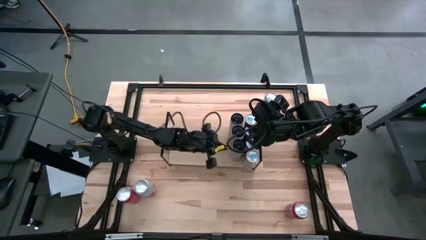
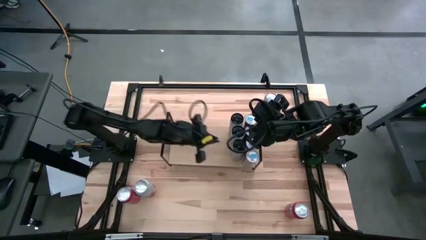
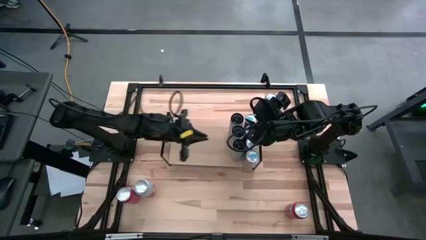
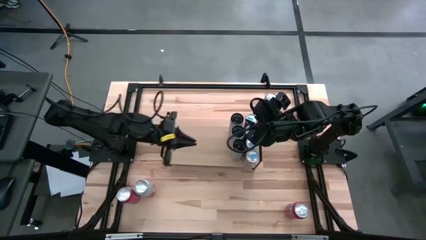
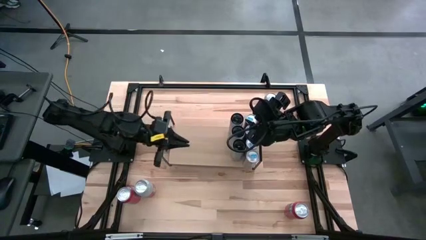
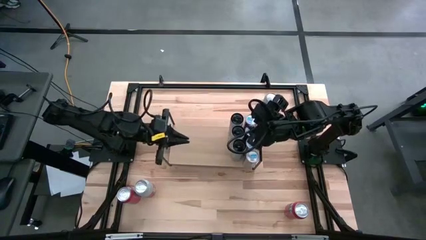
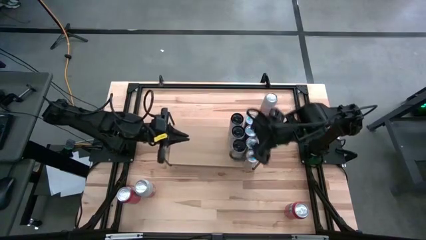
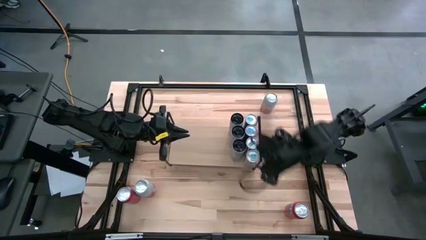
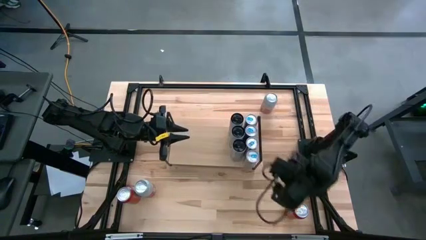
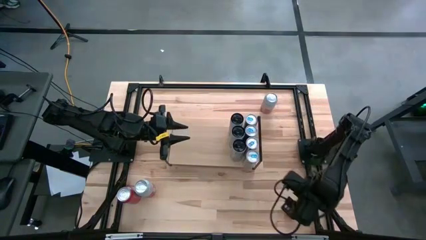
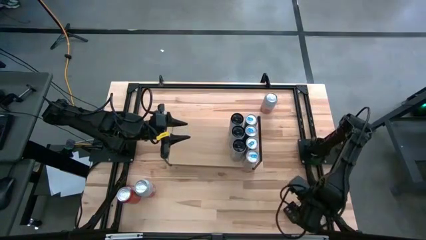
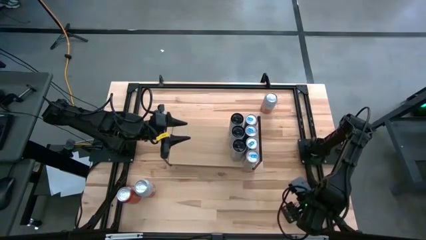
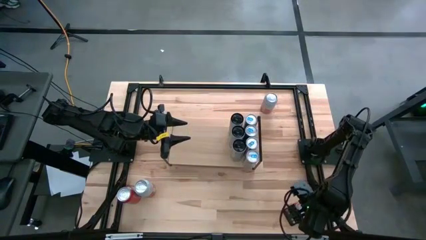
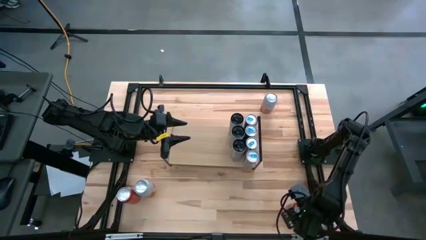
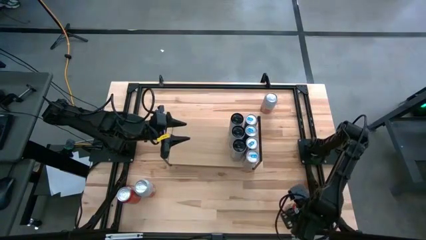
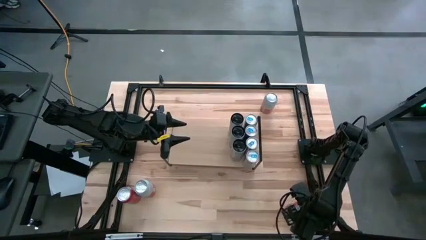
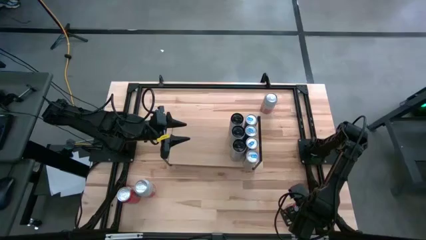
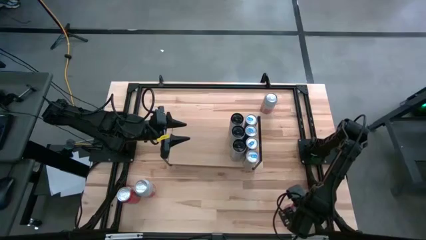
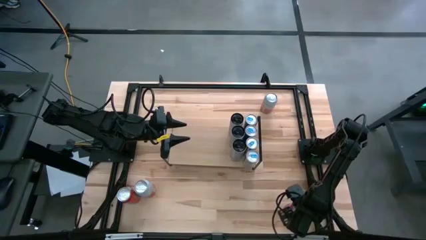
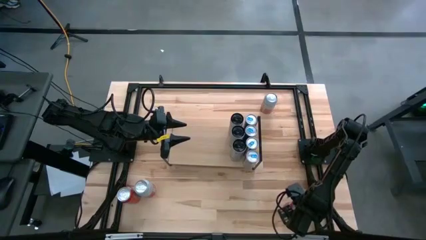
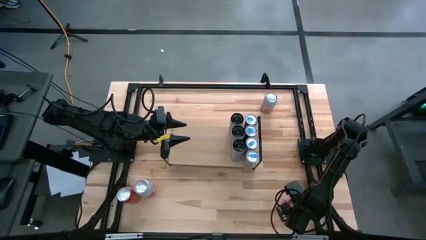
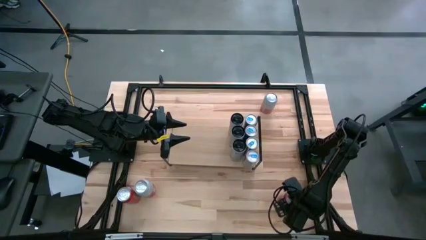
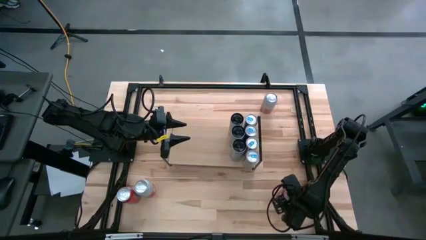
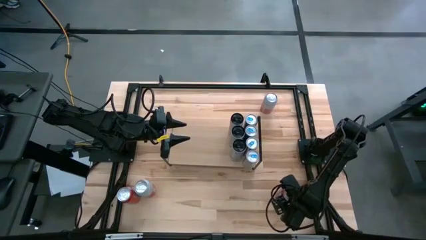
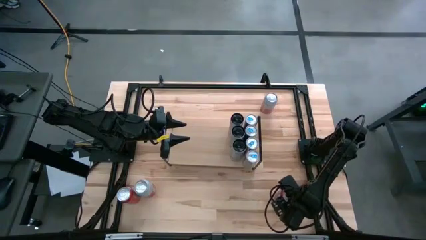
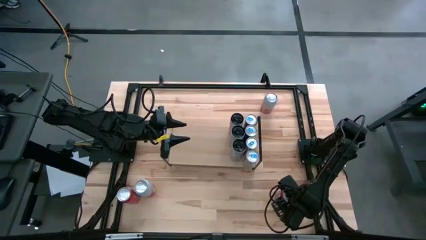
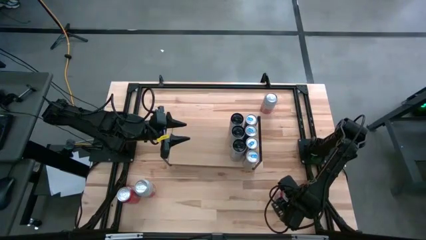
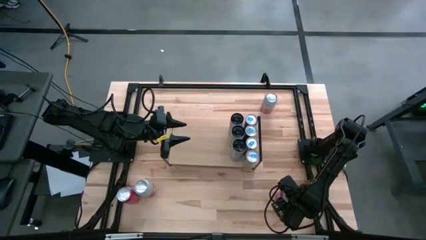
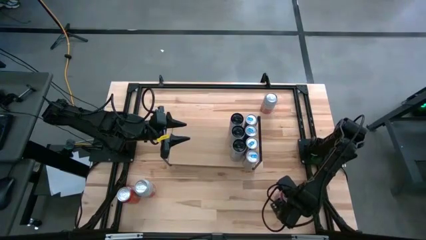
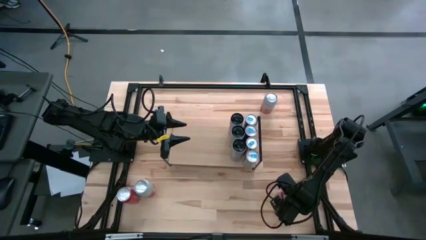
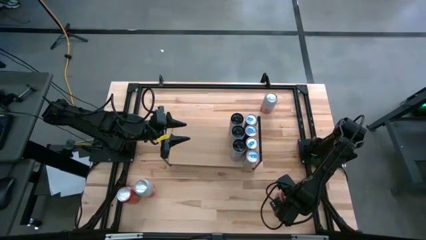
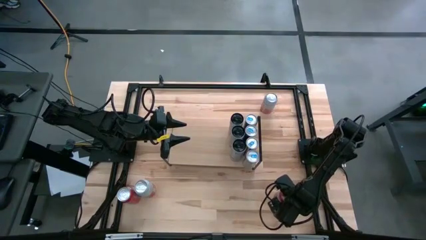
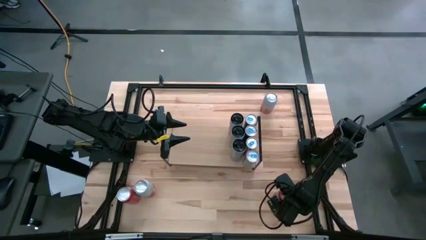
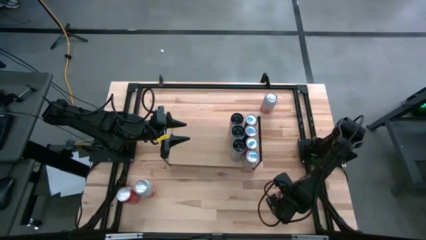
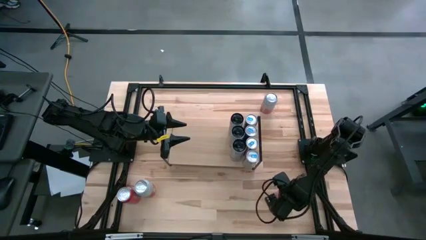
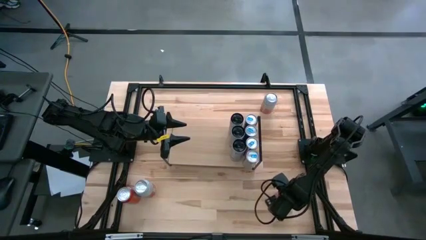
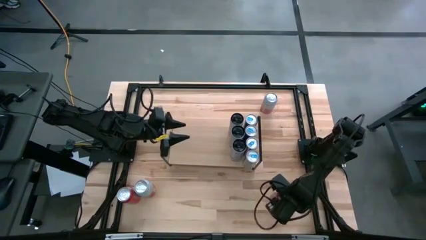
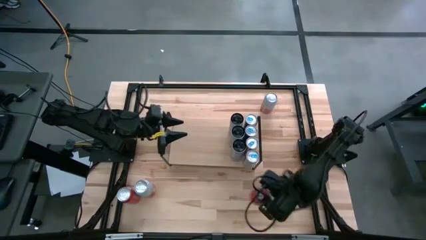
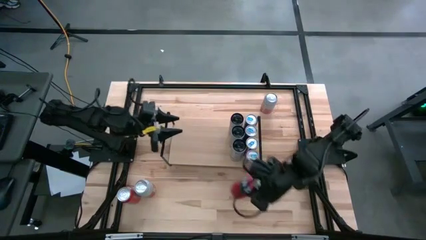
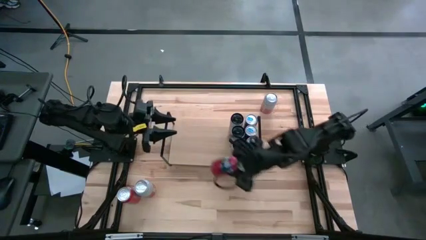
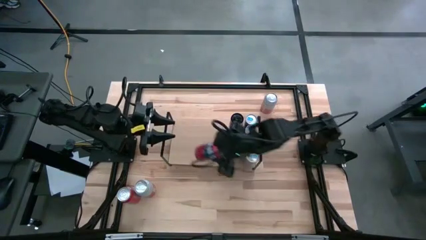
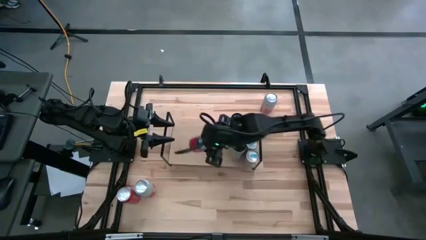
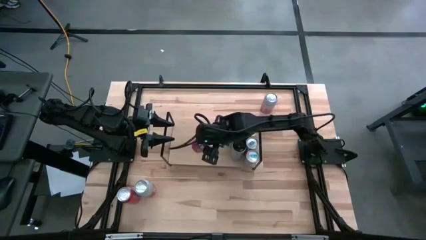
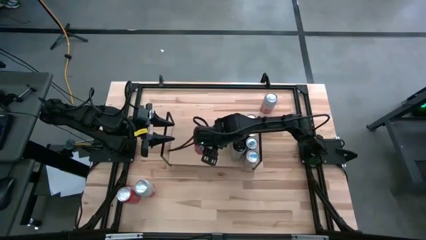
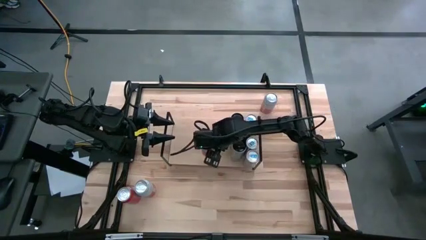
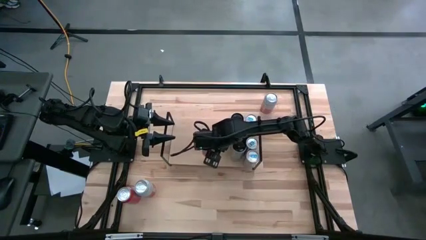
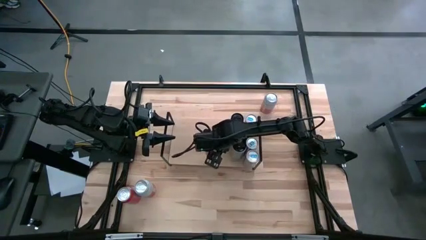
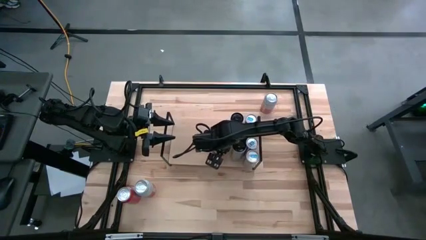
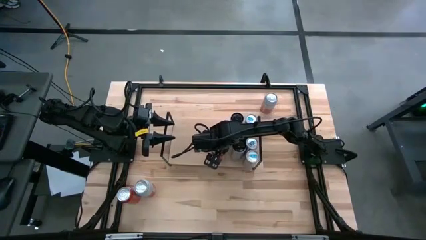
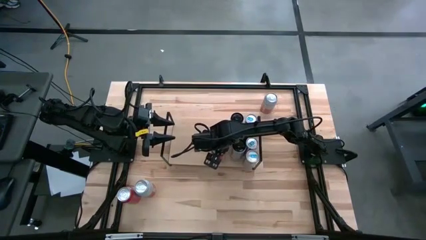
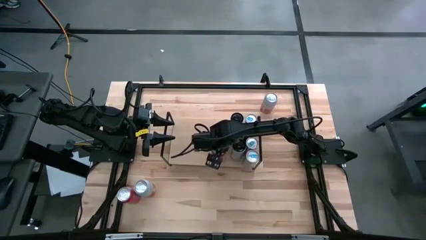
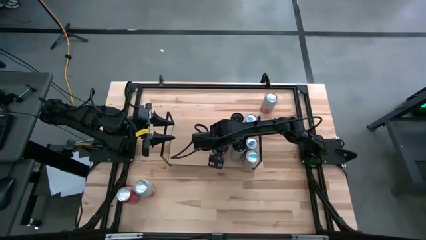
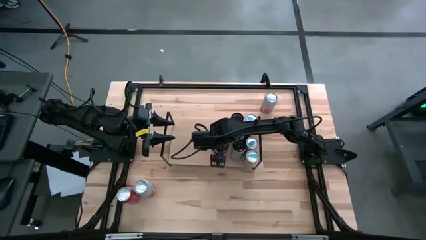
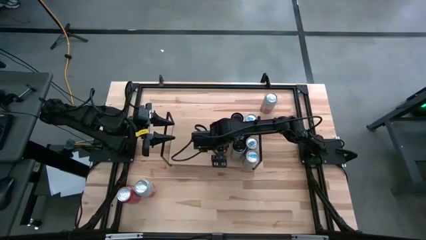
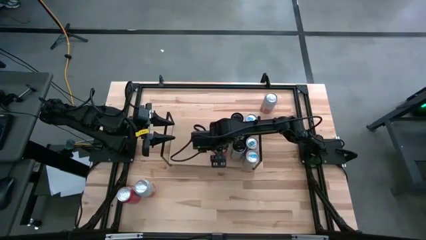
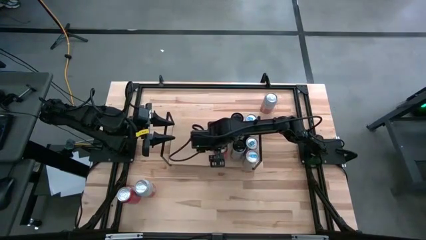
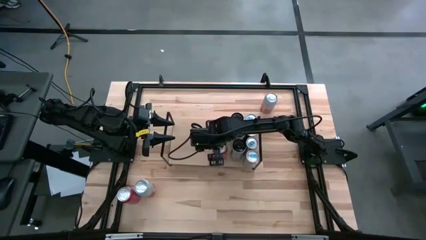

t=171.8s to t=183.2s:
Task: Place canned beverage on shelf
Put the orange soda can on the shelf
